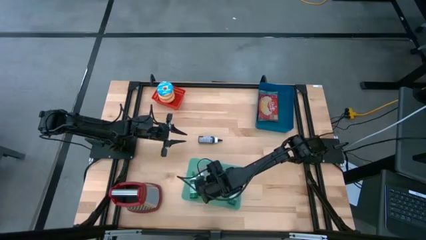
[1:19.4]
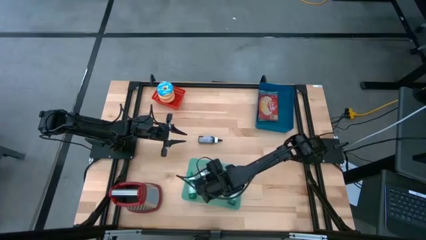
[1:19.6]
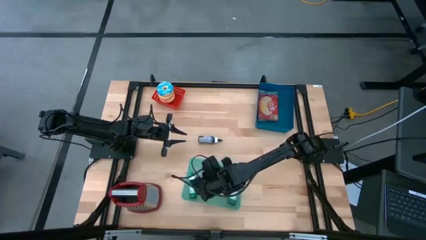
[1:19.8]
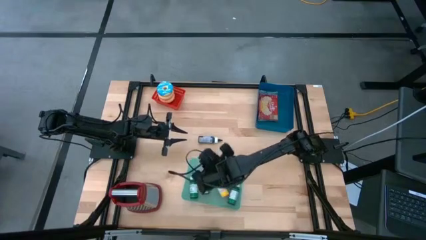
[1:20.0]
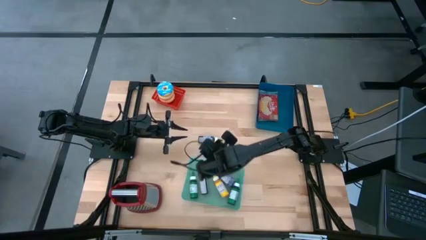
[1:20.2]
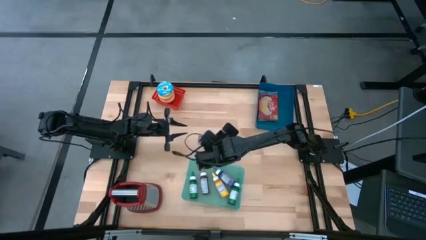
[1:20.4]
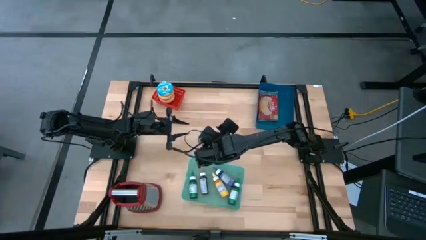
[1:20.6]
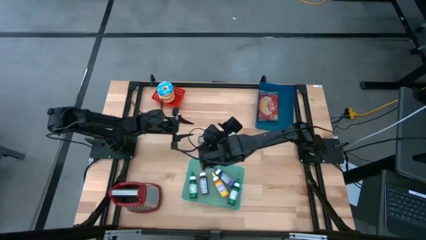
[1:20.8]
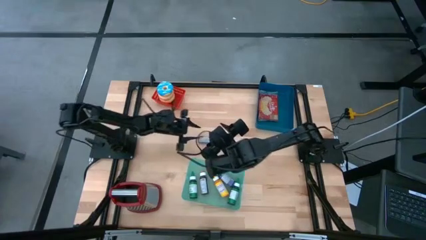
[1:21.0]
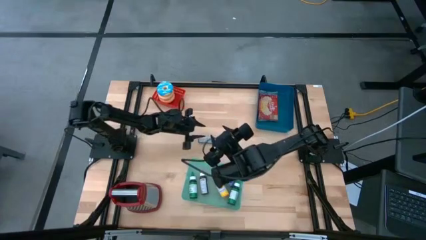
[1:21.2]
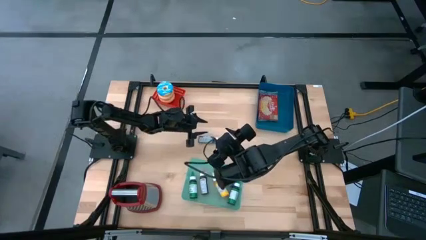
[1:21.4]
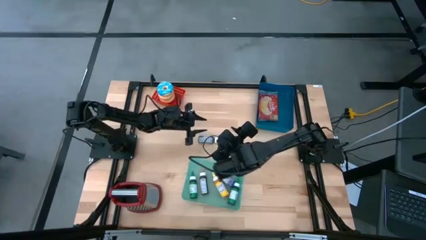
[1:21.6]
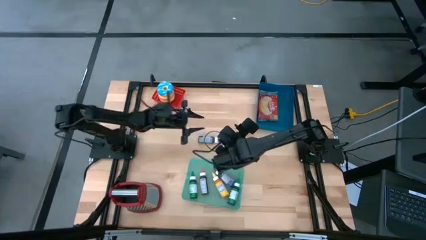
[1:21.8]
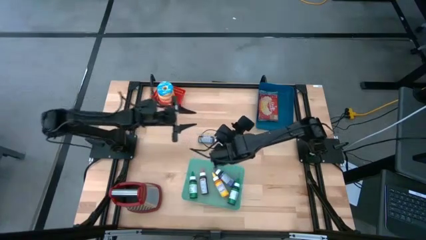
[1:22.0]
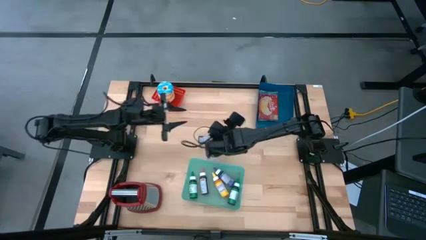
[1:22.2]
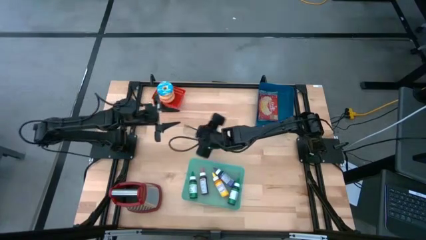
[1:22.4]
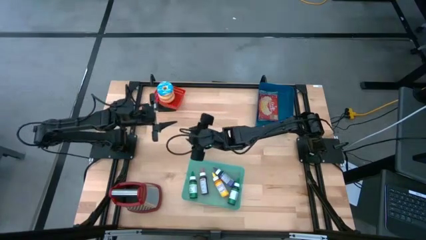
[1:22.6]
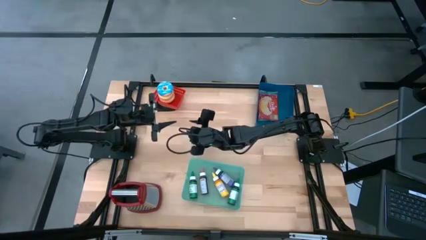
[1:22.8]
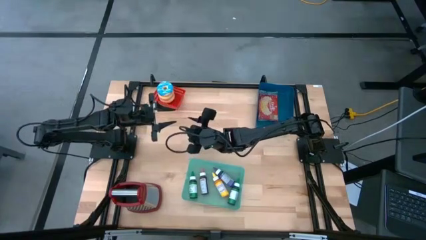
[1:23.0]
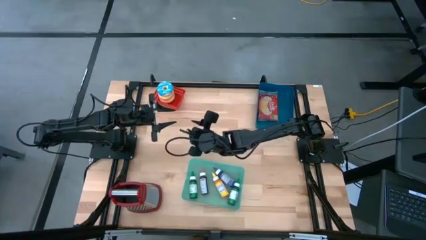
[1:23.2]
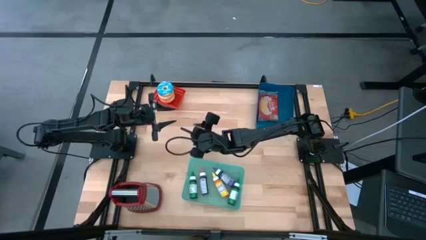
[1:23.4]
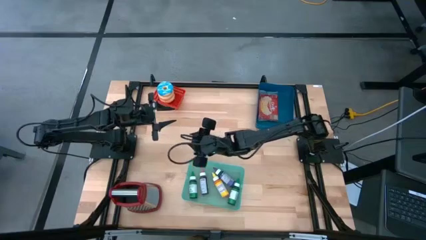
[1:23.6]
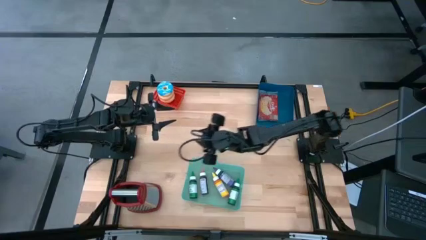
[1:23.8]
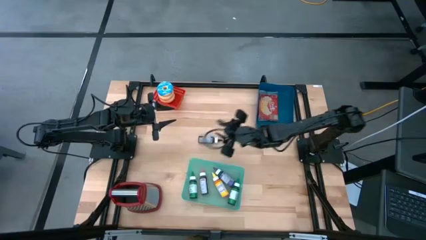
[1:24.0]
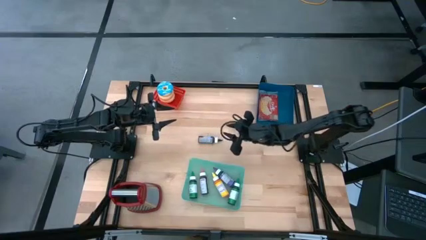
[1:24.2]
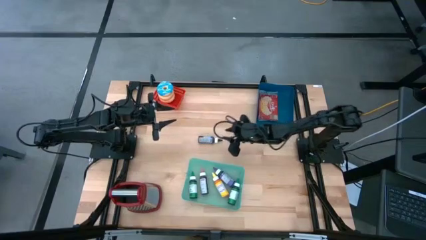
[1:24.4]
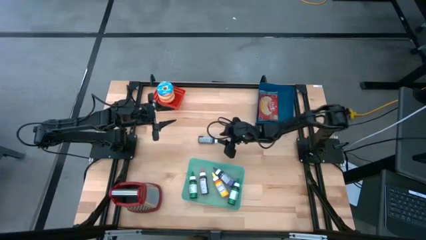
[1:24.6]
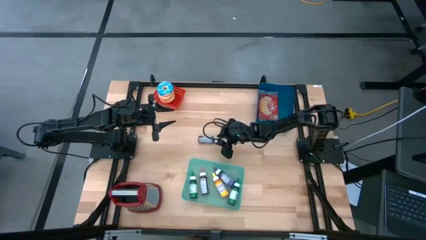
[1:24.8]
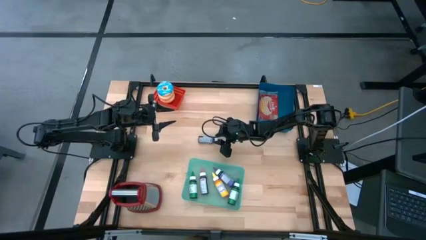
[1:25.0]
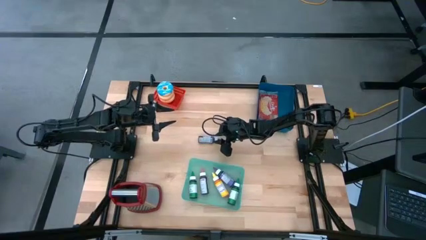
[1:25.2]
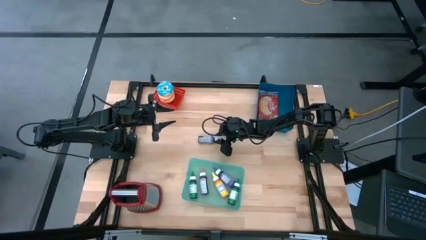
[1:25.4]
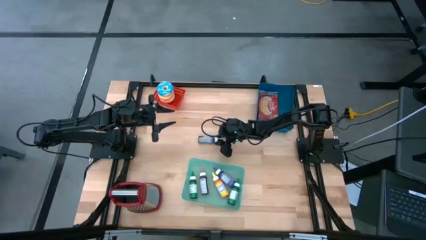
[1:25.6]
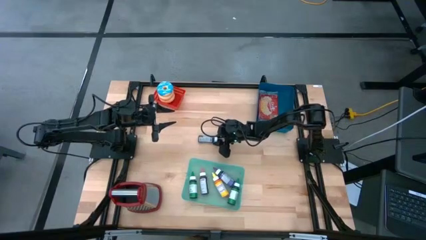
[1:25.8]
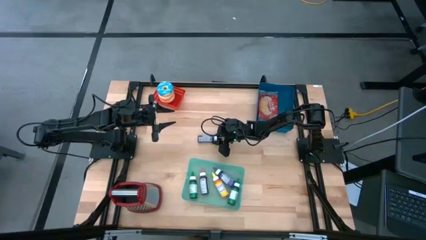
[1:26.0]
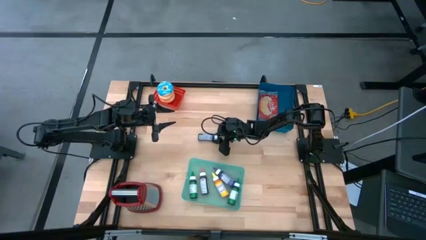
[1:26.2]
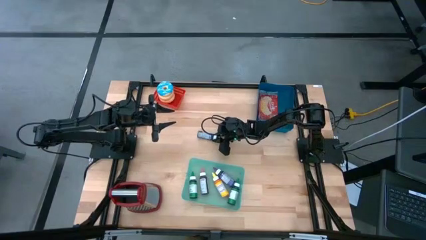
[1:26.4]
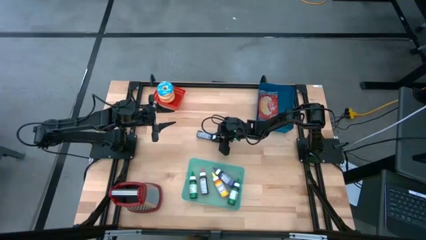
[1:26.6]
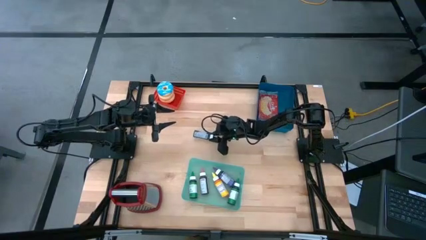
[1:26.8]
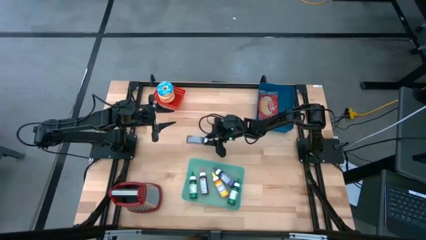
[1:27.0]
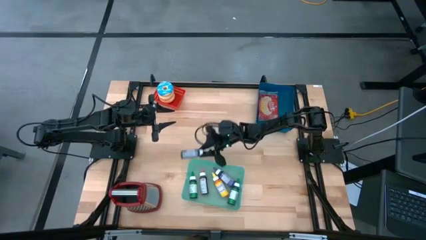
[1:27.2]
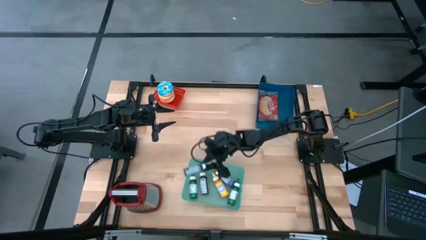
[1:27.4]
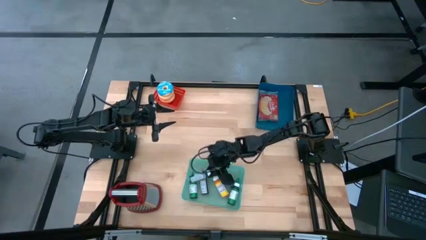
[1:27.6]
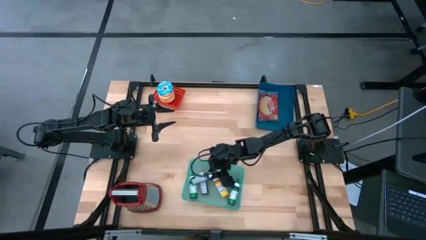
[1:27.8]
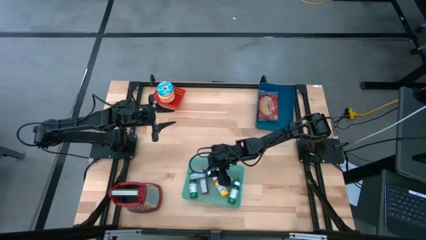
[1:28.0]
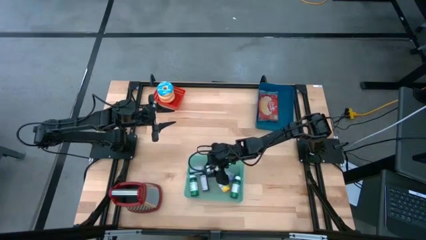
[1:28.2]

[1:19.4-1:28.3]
Put the black food coloring bottle into the green bin

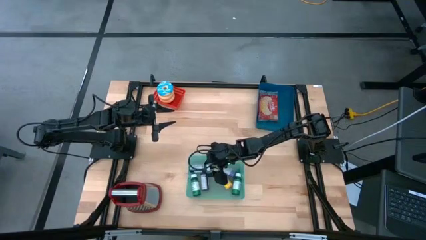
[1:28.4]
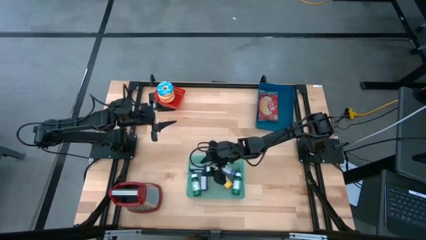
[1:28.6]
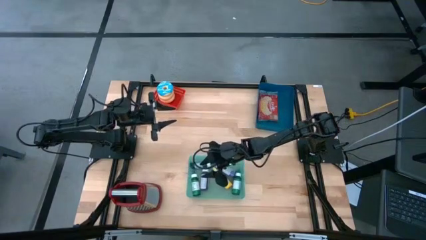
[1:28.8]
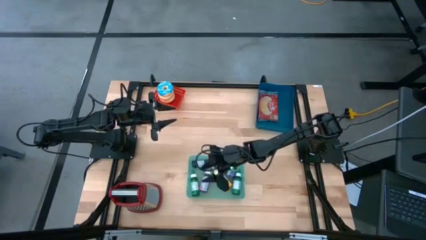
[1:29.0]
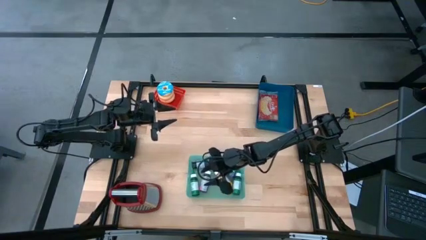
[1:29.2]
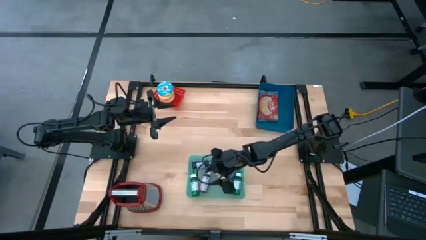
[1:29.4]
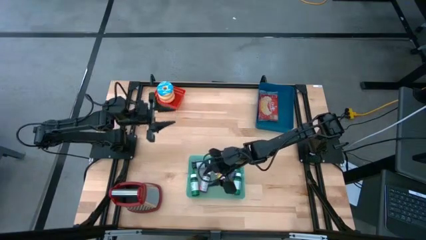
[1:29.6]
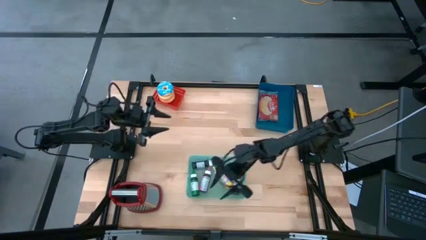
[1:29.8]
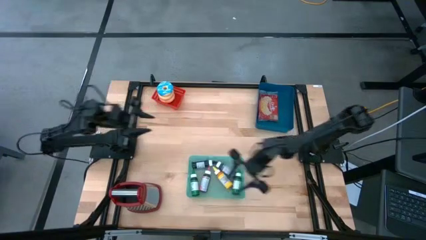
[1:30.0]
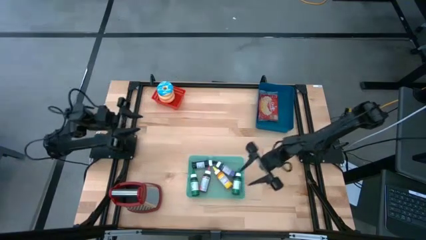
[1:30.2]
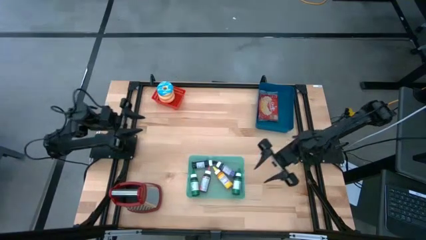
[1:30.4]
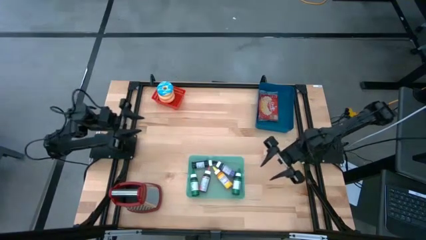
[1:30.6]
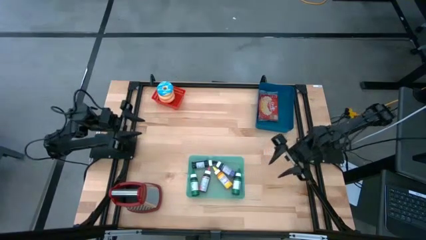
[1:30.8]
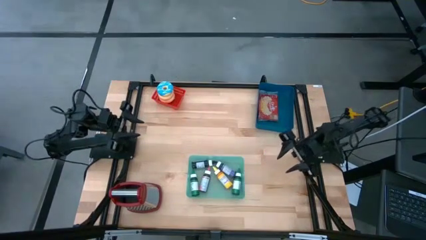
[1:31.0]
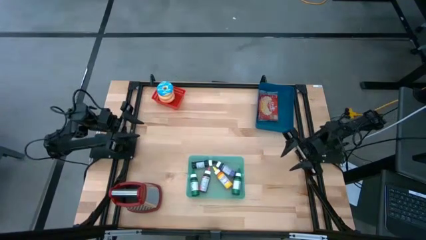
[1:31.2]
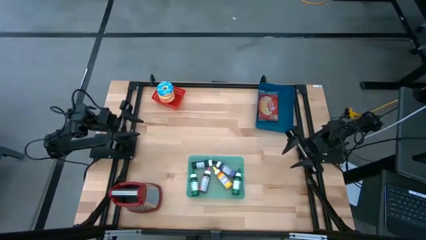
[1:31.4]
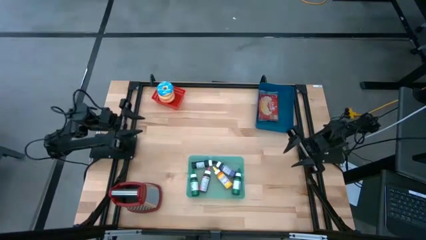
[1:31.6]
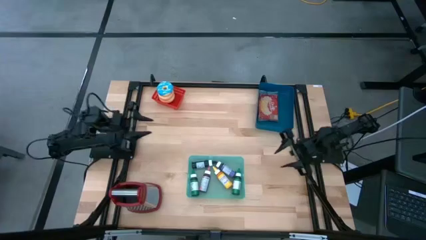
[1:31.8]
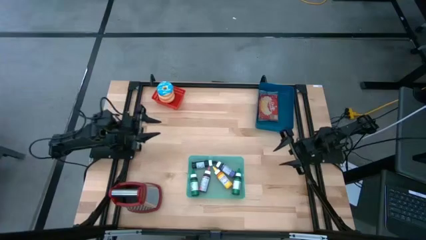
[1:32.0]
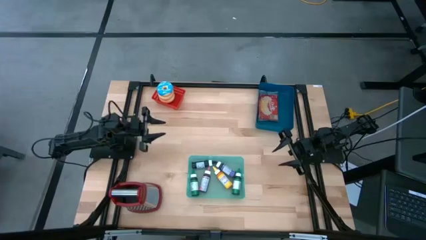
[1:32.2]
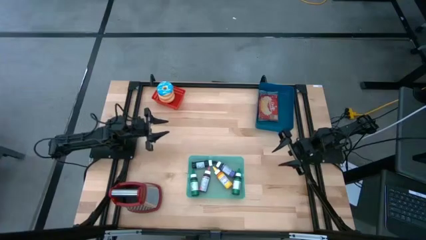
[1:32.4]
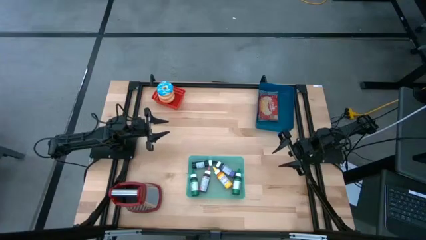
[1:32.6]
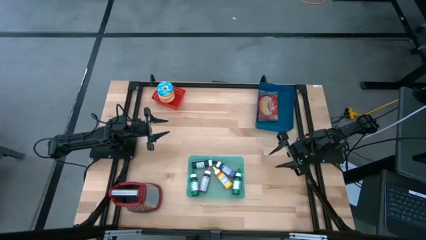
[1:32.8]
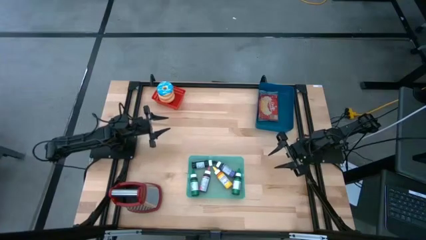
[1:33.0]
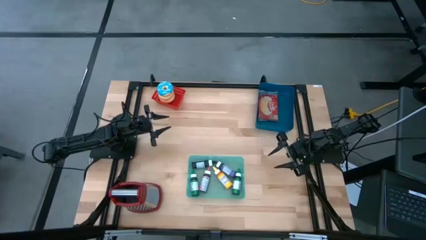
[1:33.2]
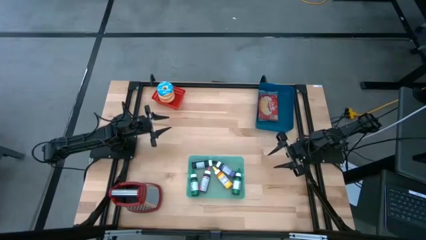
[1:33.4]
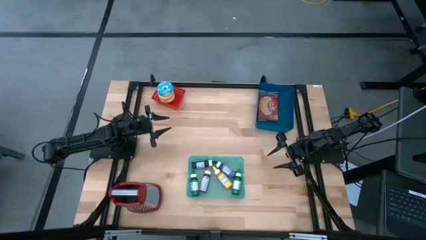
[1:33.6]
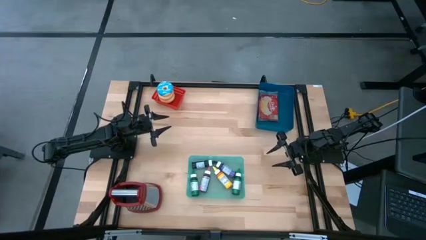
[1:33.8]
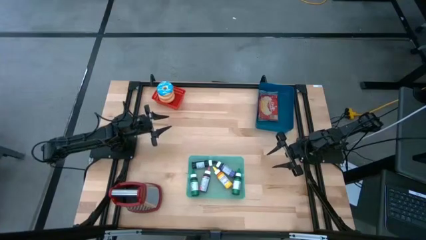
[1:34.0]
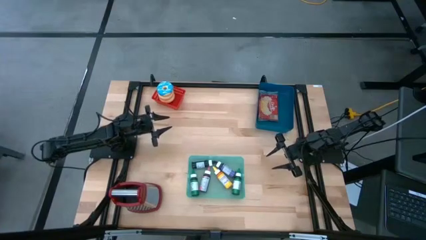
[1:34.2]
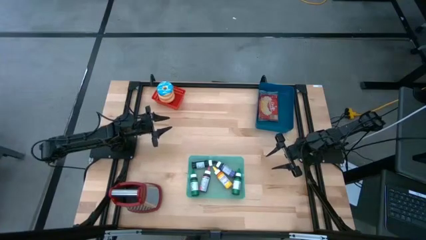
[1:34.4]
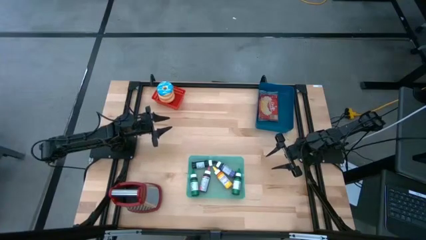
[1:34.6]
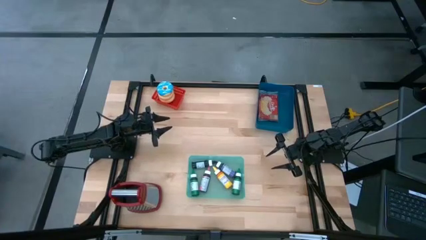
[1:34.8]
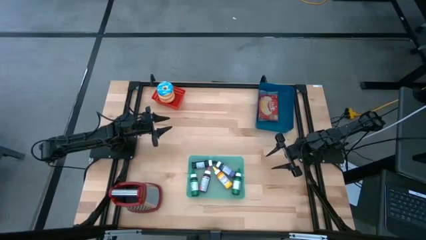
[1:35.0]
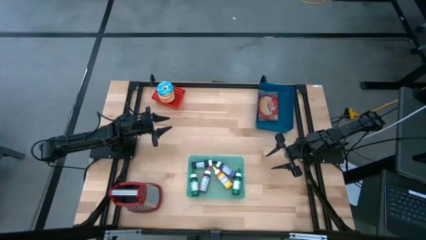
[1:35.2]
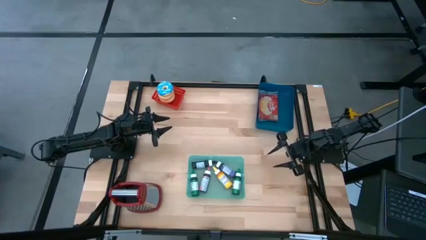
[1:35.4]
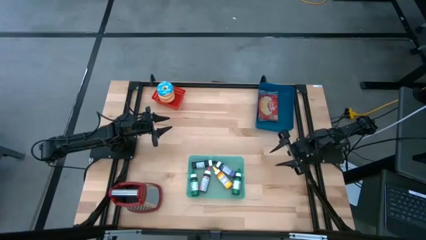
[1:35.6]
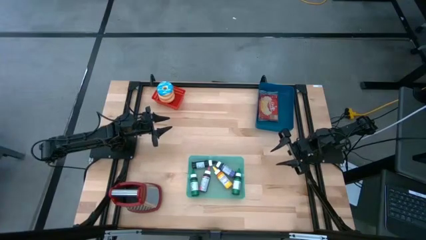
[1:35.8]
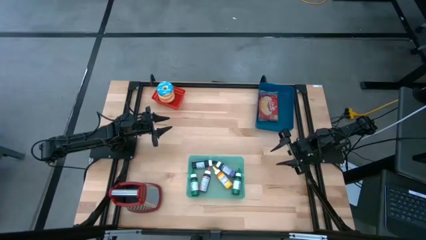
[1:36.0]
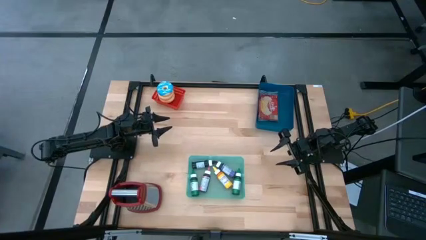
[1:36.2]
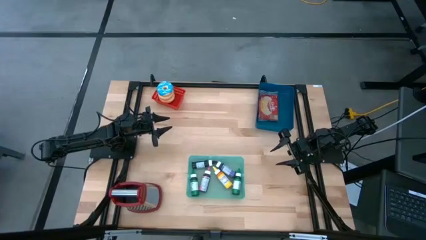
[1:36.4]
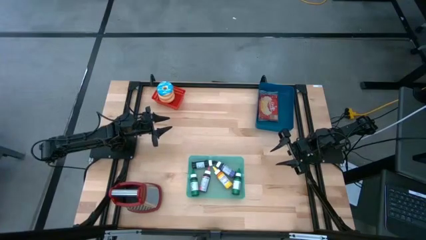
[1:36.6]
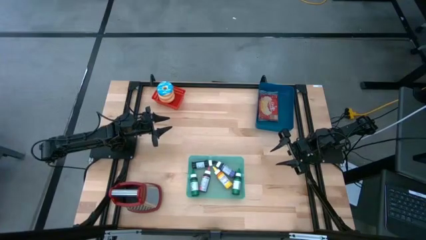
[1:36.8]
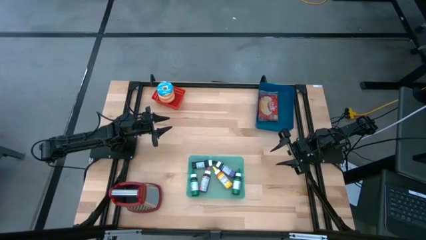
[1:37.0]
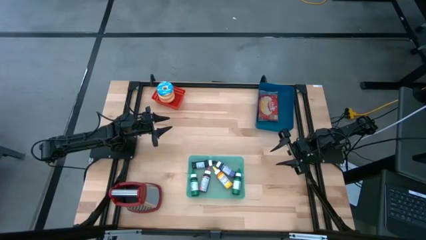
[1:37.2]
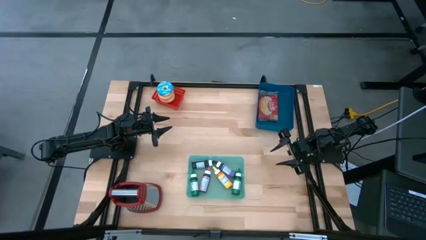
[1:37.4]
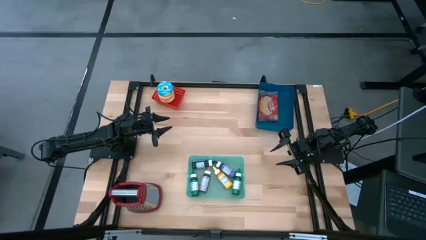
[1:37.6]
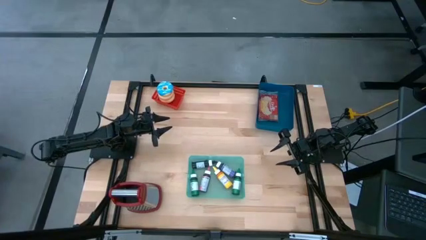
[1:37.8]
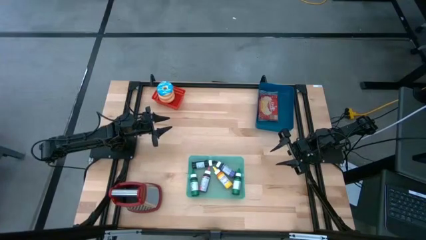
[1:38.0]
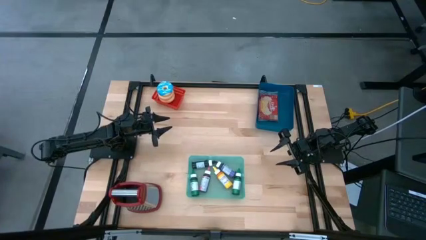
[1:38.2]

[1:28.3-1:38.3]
Return to Home Position
